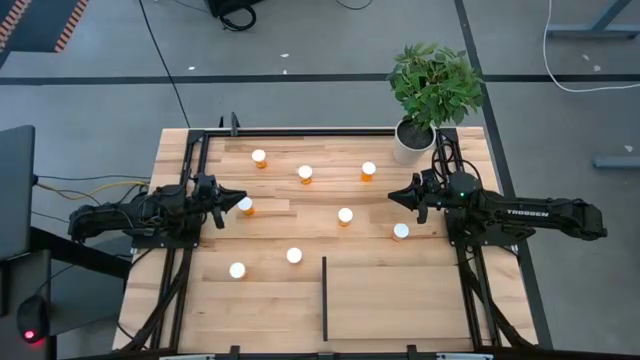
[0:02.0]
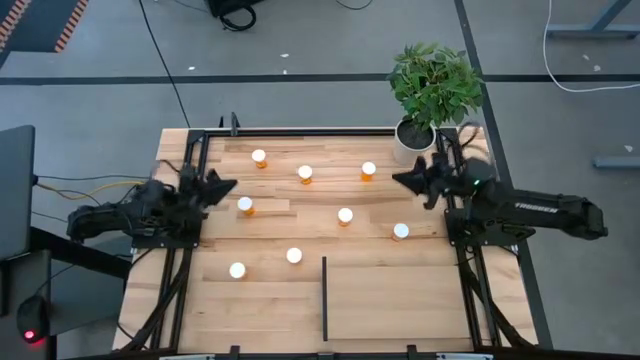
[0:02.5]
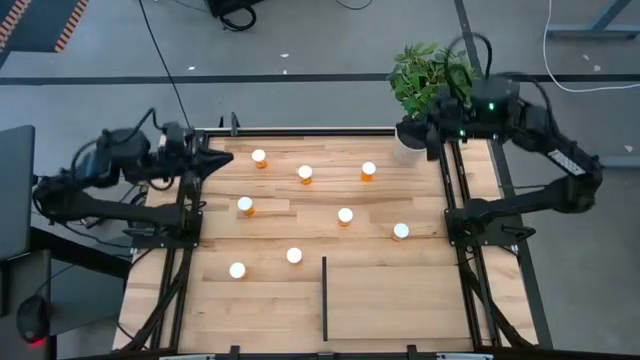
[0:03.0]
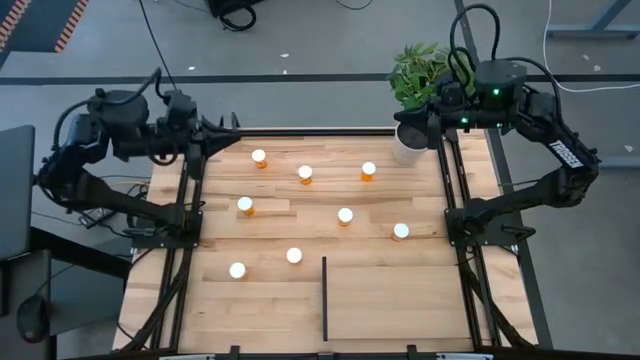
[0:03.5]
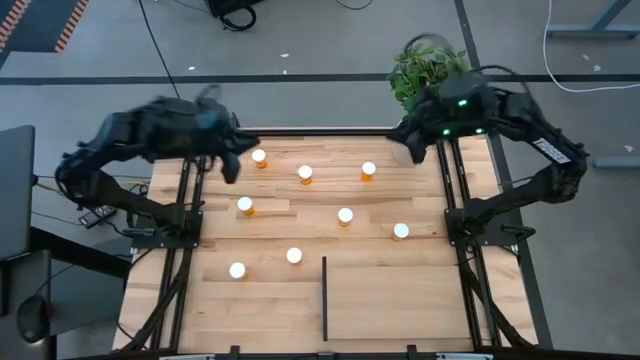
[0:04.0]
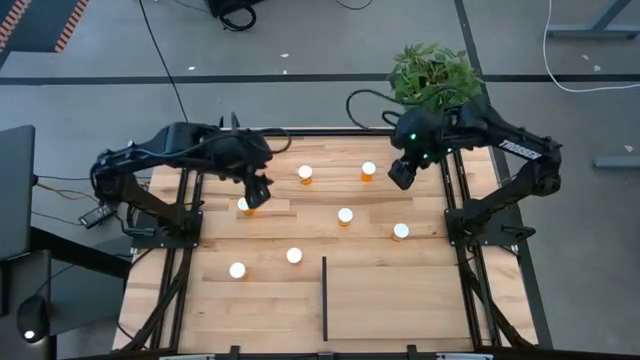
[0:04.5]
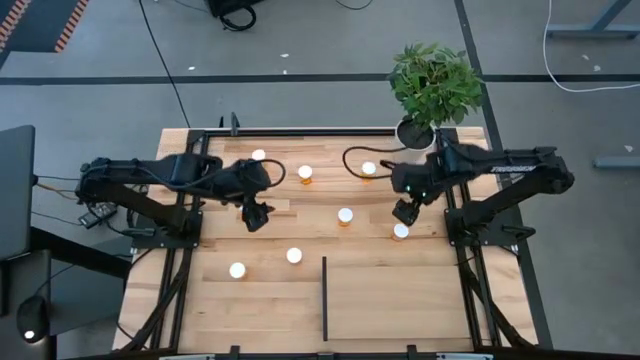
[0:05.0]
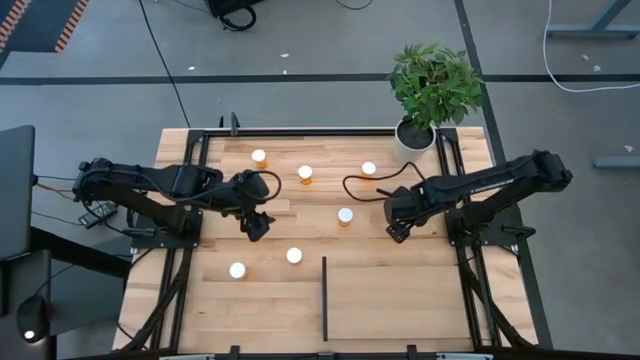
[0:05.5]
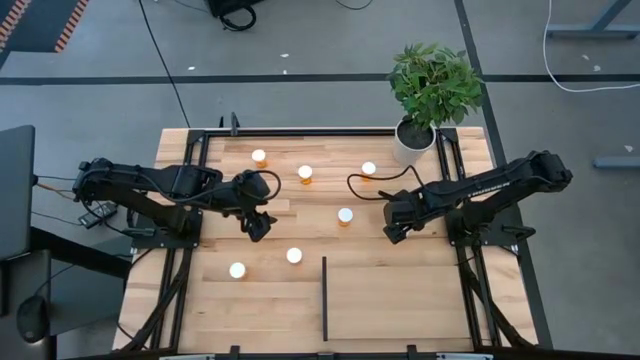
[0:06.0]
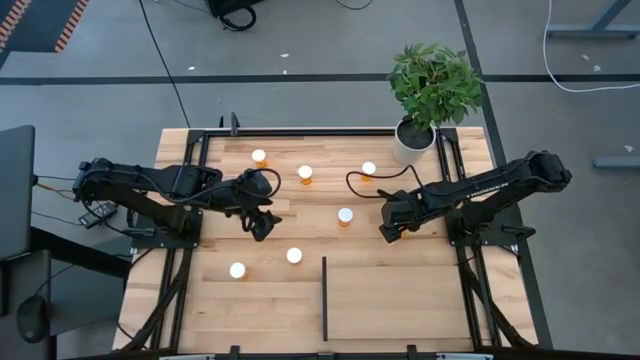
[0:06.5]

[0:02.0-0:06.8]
Task: Pick and place medicine bottles onto shelf by color
Put the orange pill bottle on the shelf

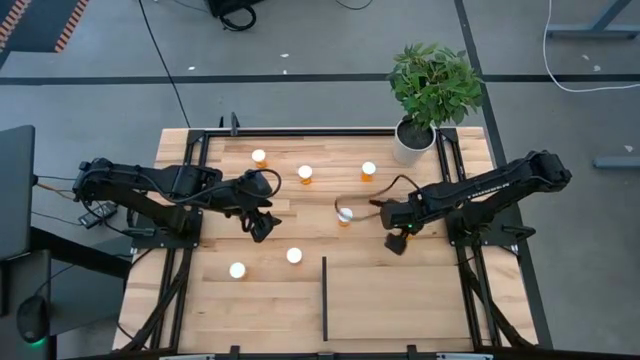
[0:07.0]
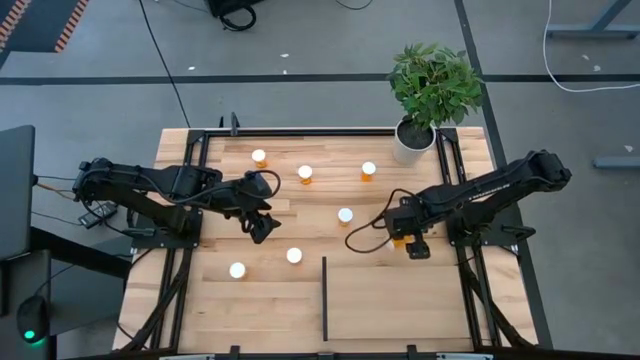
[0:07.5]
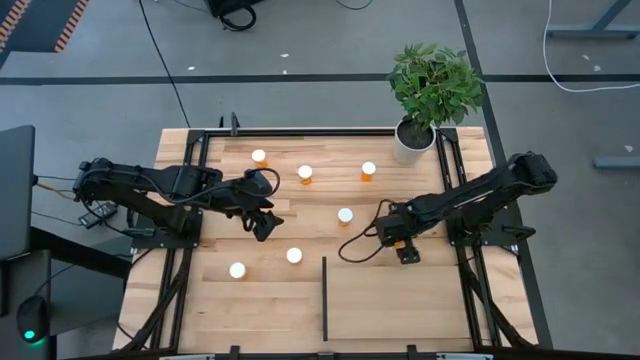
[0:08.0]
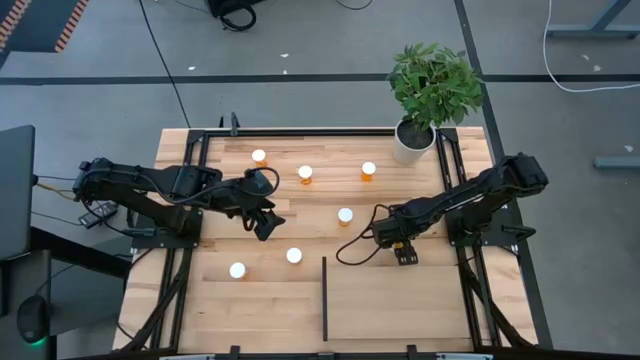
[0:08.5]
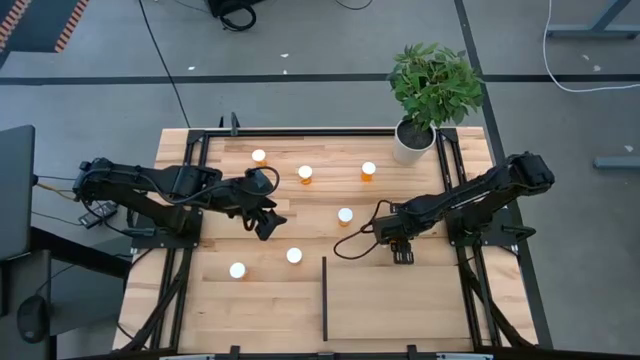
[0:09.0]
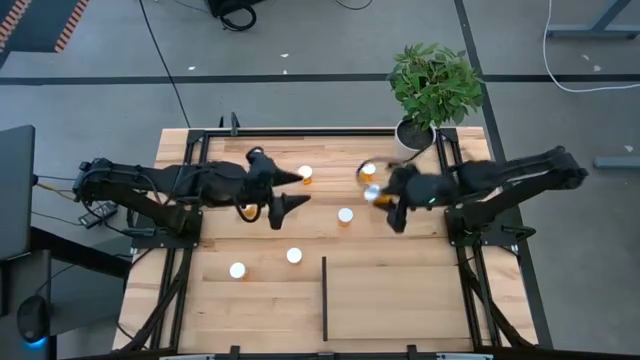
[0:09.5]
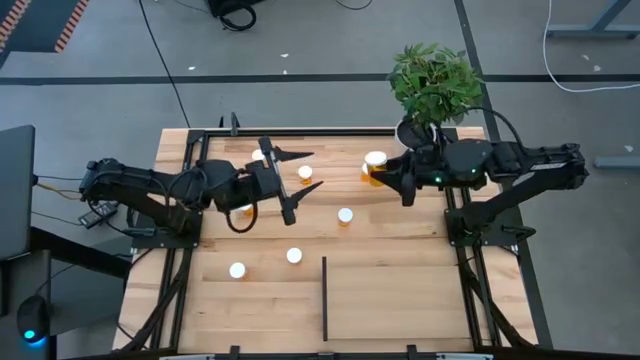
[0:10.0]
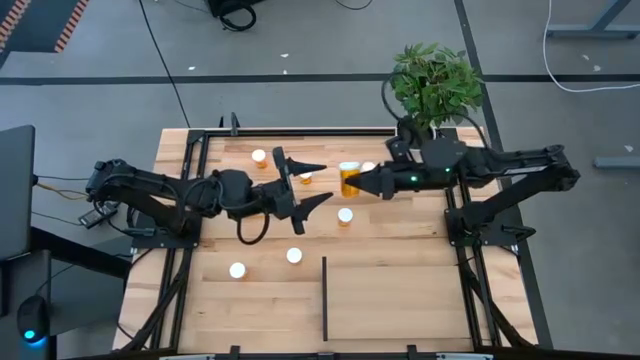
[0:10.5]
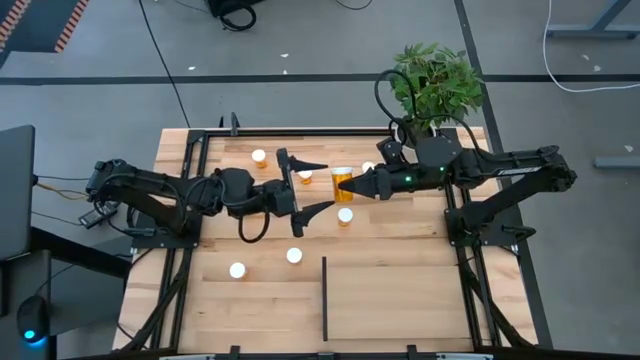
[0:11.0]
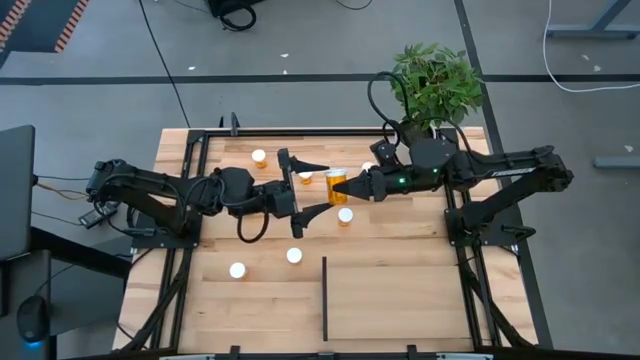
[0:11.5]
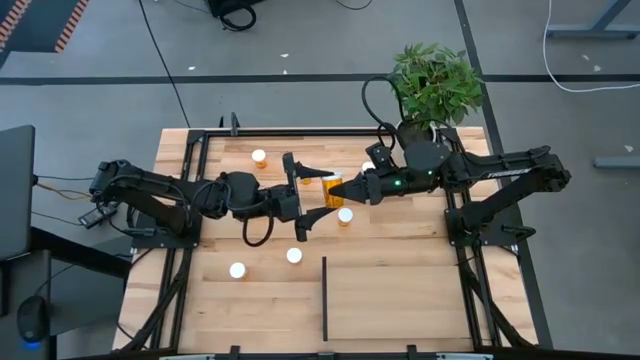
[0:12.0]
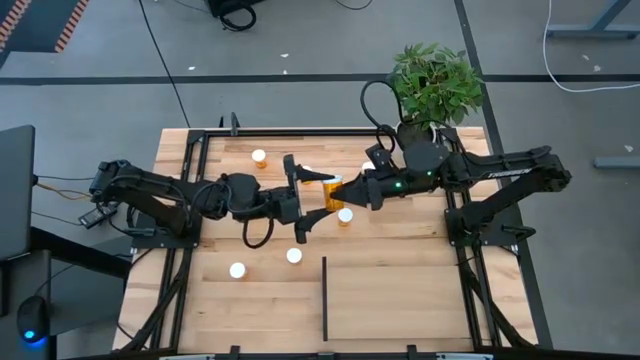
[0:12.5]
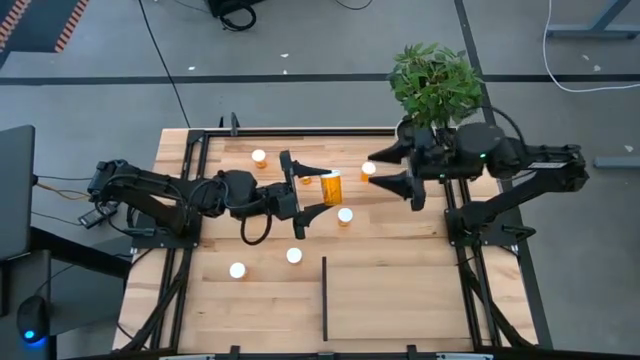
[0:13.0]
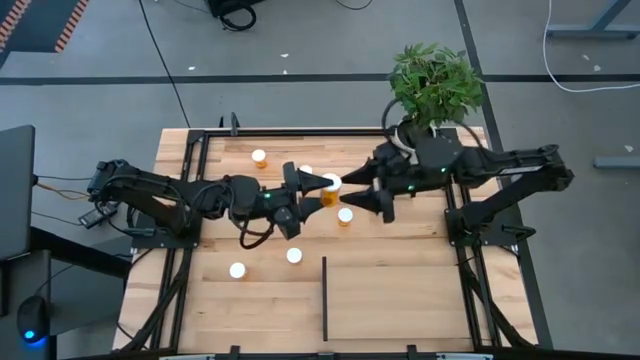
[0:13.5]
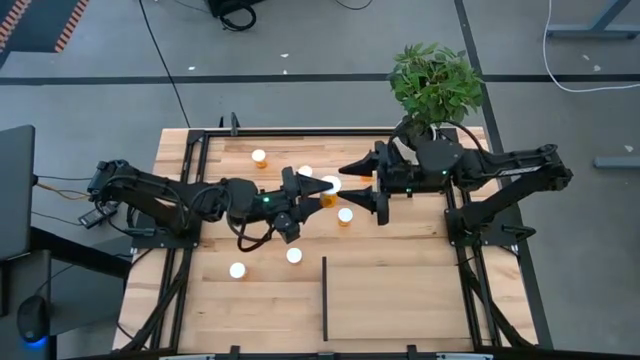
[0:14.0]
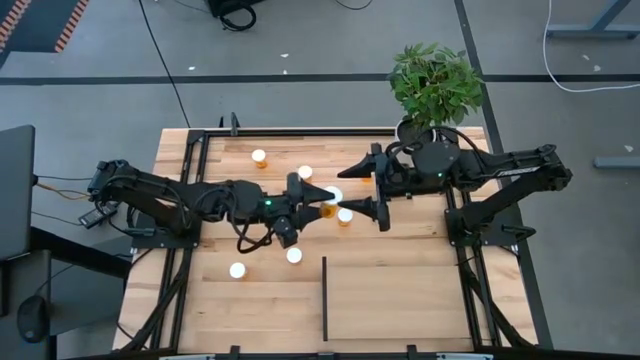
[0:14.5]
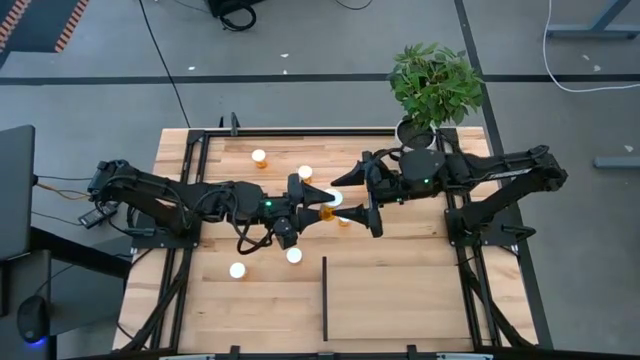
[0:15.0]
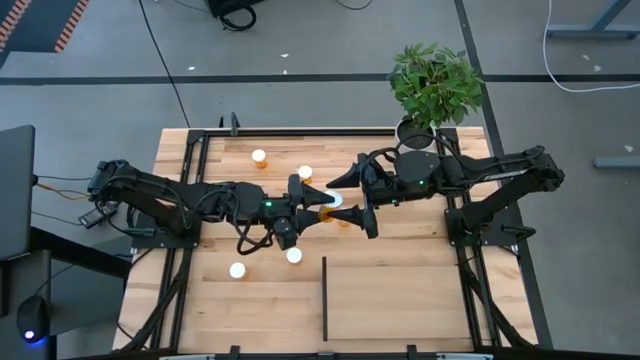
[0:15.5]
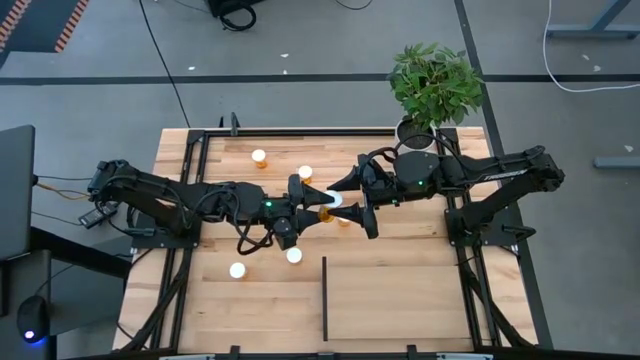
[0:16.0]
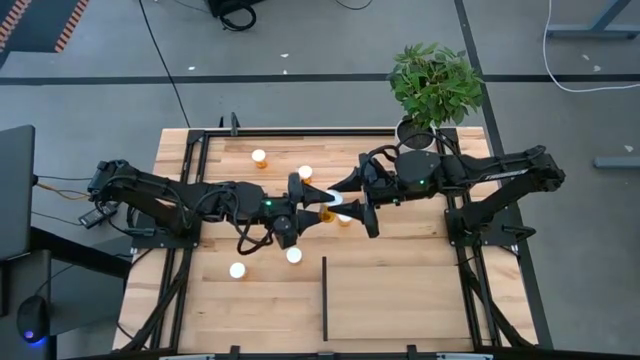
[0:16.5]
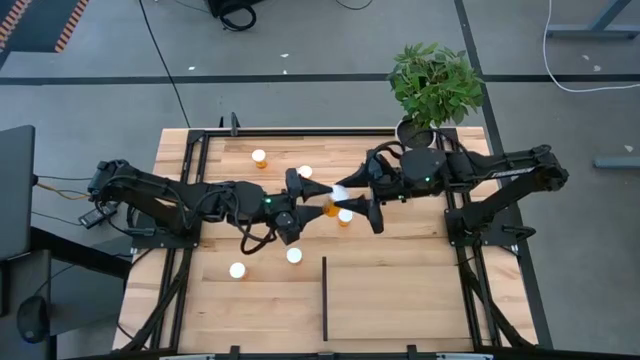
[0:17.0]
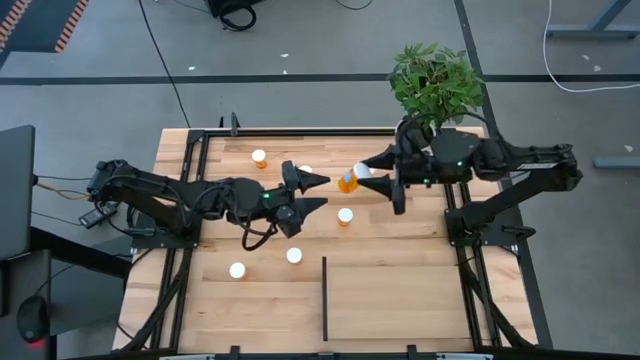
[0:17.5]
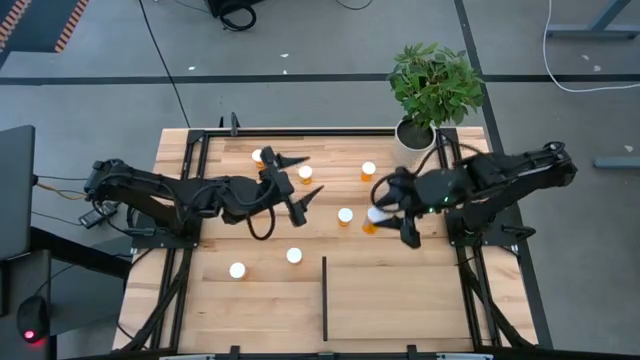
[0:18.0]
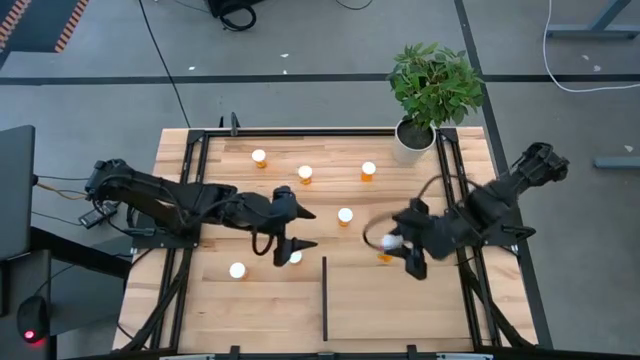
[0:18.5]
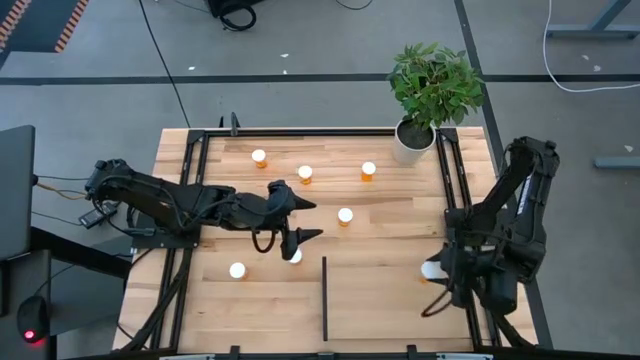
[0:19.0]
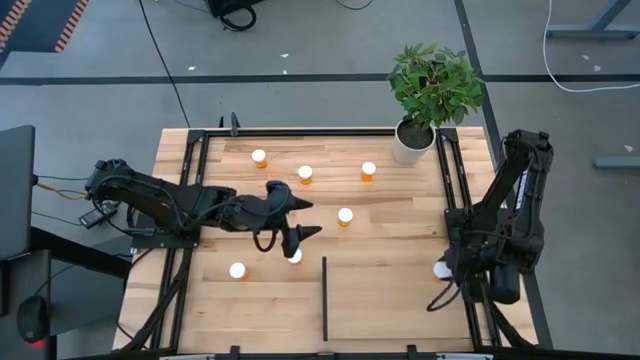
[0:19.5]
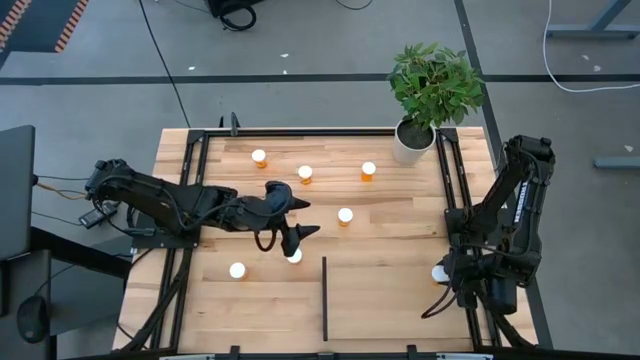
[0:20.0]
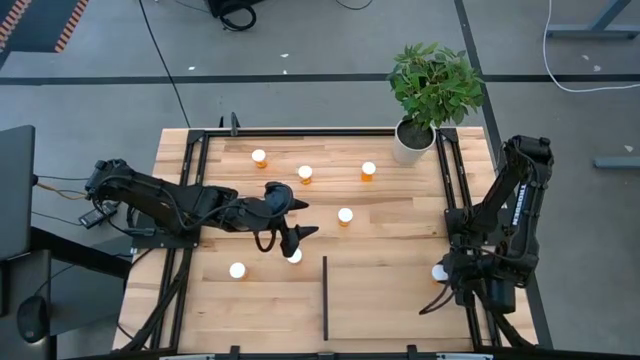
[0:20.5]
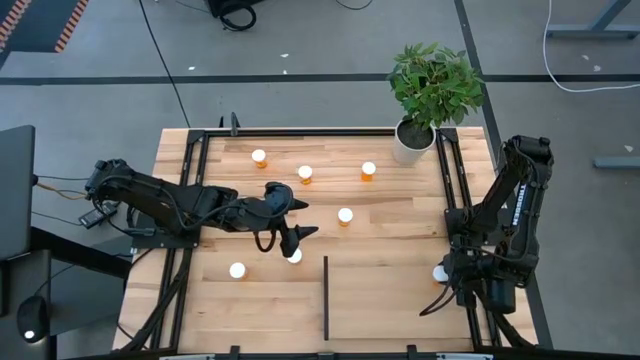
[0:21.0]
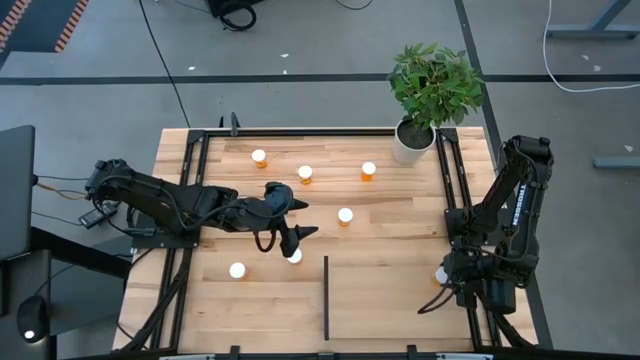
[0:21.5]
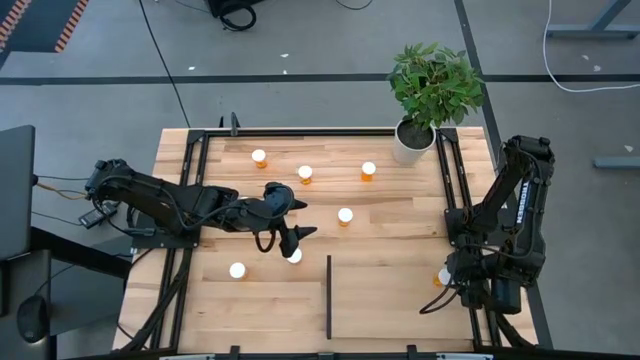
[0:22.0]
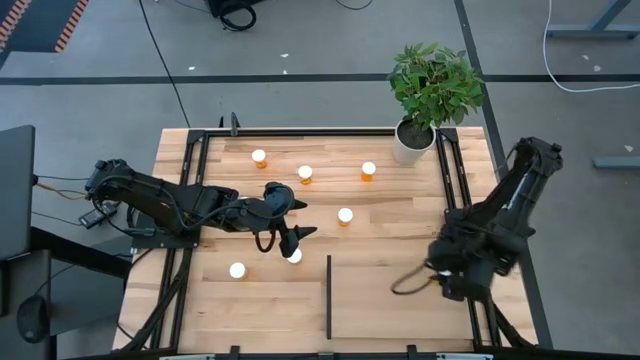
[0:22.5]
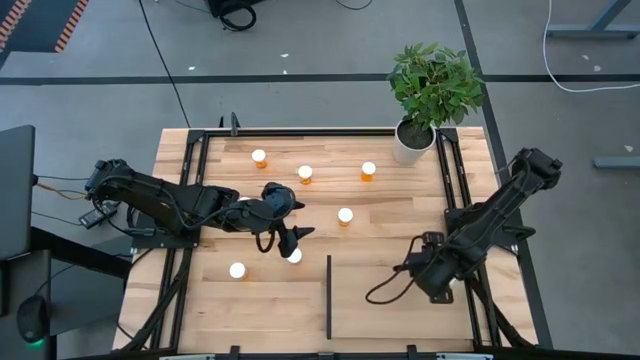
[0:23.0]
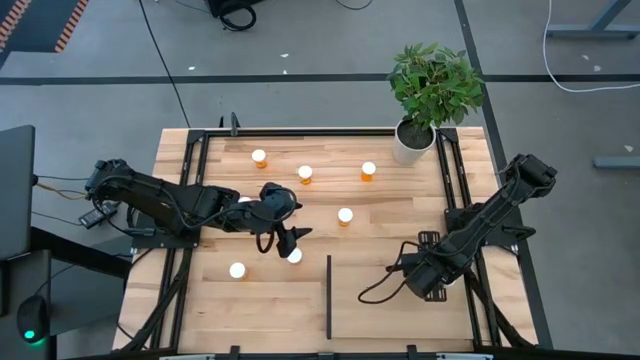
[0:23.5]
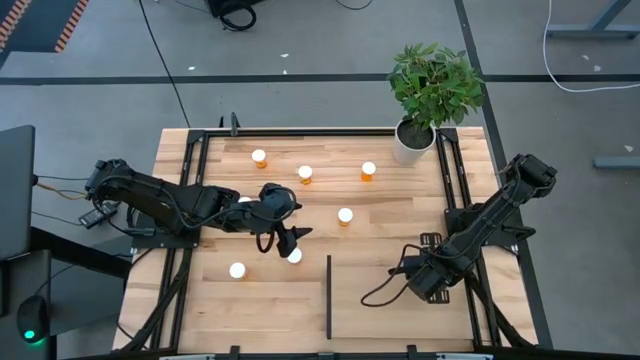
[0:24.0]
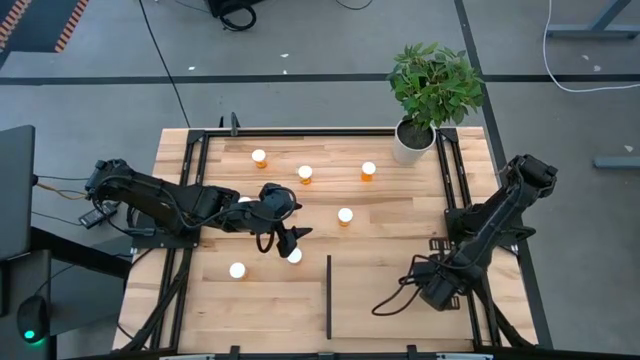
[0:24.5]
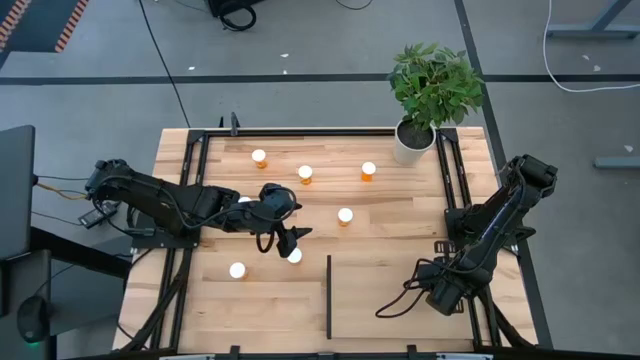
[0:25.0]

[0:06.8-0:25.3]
Put the orange pill bottle on the shelf
